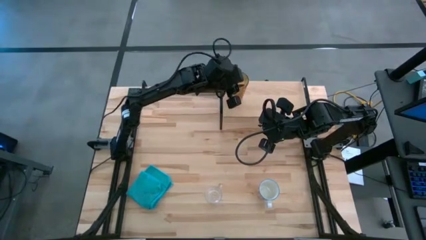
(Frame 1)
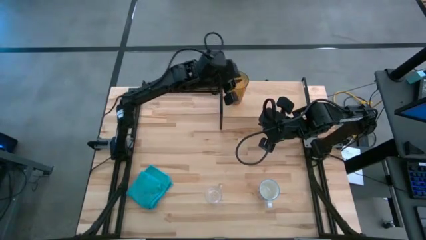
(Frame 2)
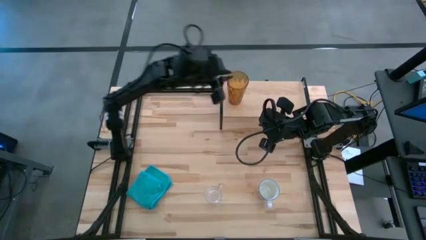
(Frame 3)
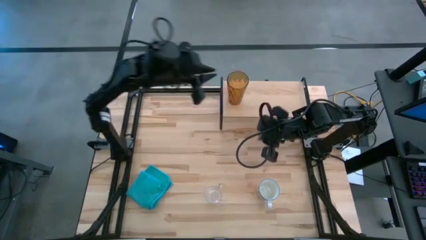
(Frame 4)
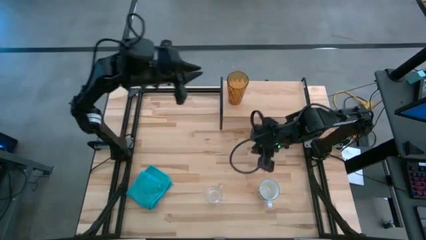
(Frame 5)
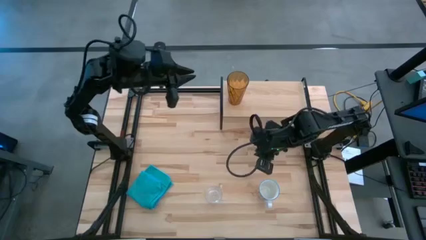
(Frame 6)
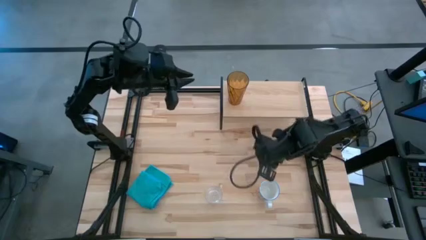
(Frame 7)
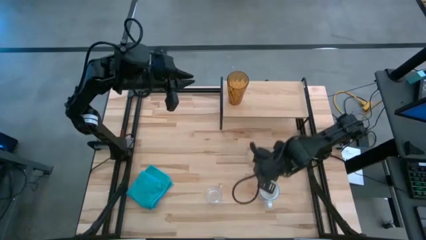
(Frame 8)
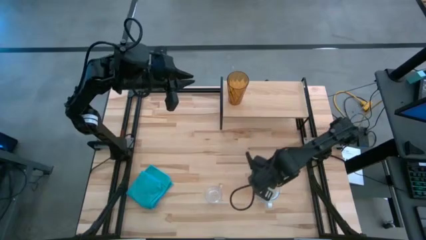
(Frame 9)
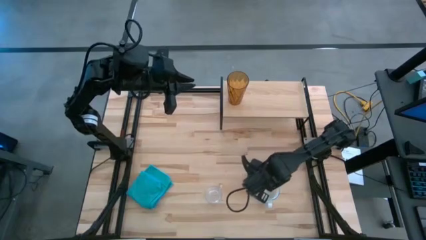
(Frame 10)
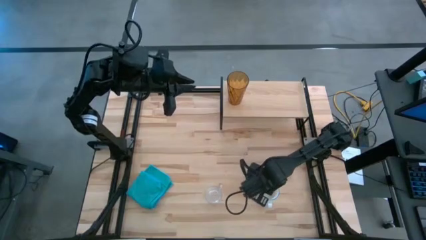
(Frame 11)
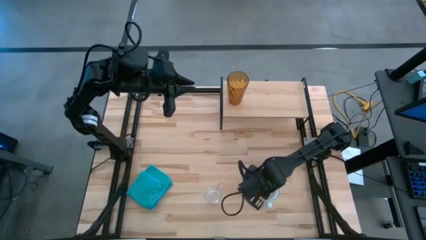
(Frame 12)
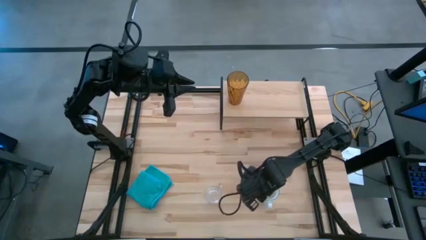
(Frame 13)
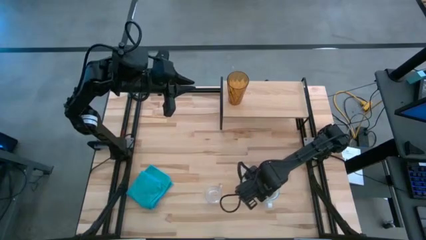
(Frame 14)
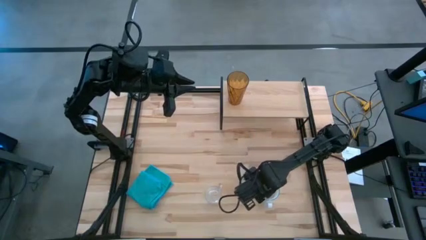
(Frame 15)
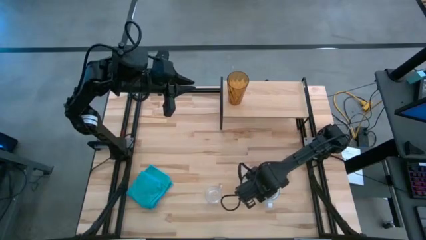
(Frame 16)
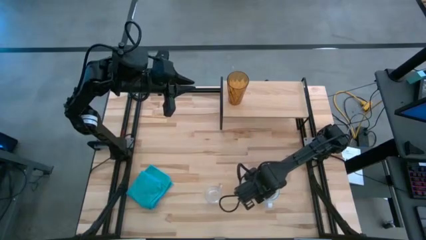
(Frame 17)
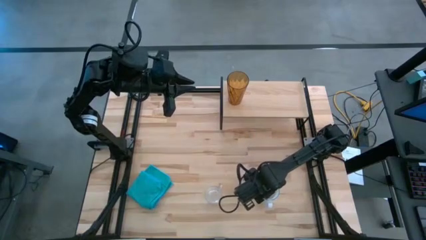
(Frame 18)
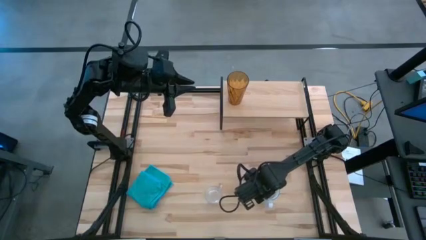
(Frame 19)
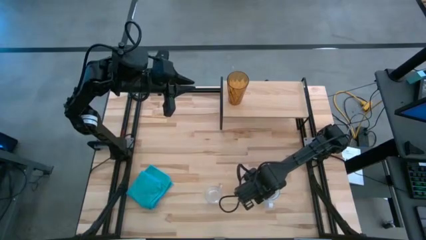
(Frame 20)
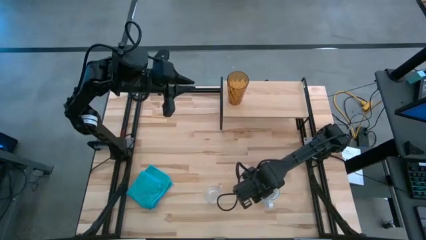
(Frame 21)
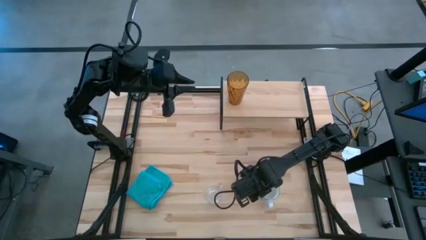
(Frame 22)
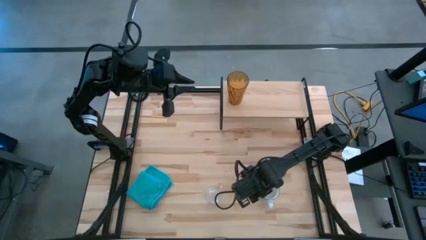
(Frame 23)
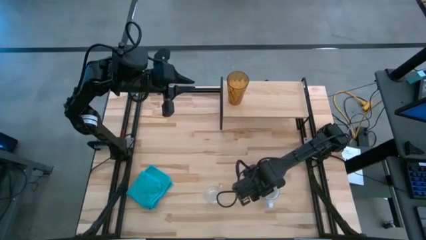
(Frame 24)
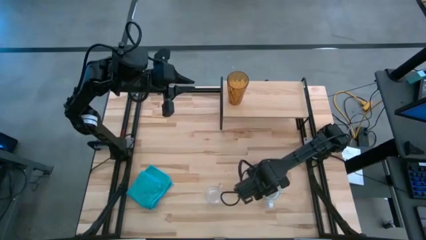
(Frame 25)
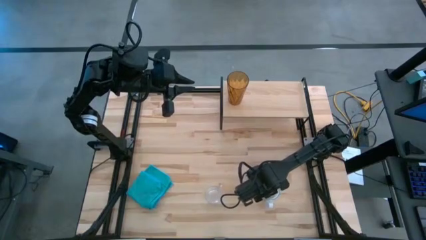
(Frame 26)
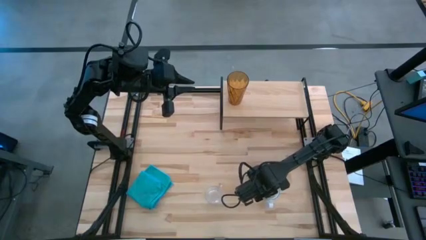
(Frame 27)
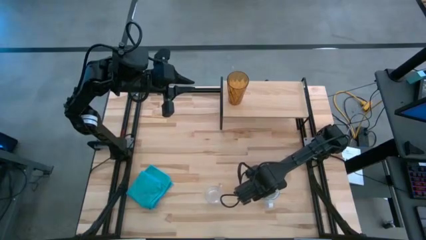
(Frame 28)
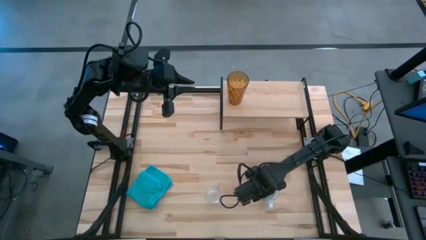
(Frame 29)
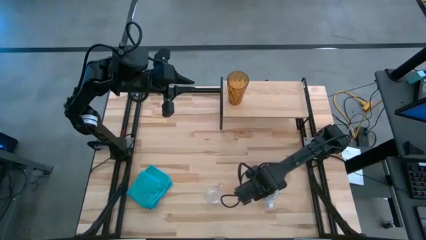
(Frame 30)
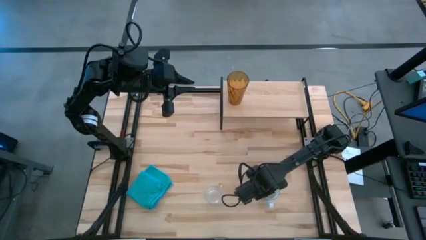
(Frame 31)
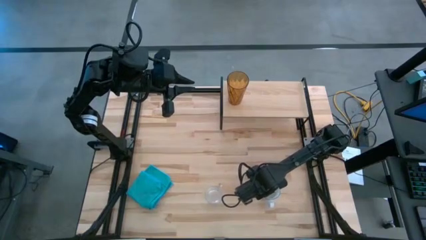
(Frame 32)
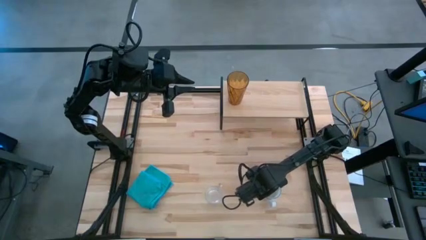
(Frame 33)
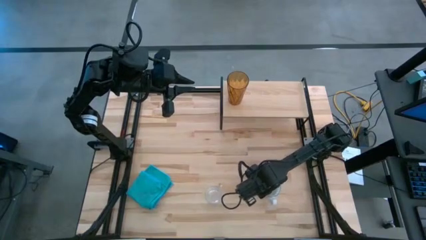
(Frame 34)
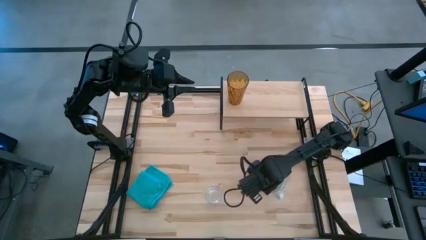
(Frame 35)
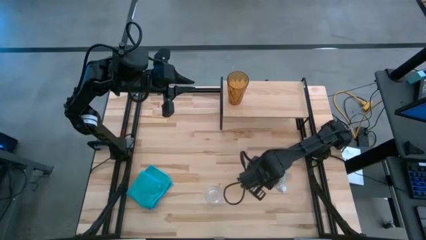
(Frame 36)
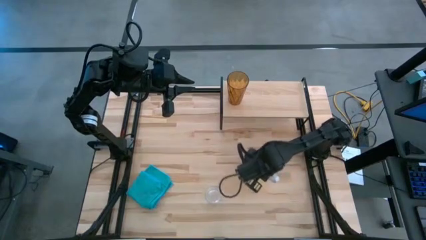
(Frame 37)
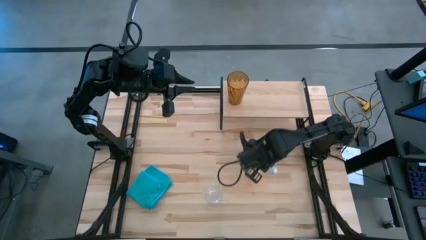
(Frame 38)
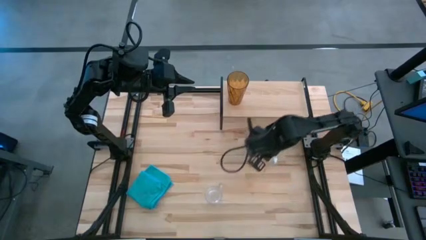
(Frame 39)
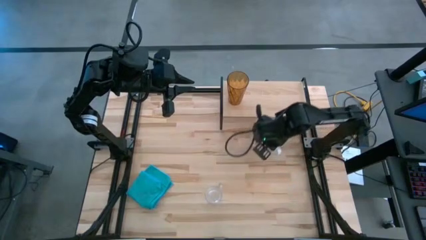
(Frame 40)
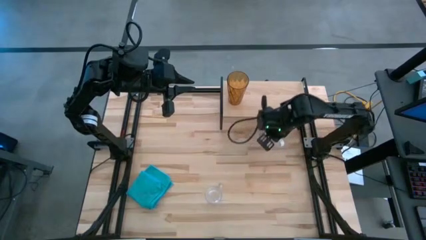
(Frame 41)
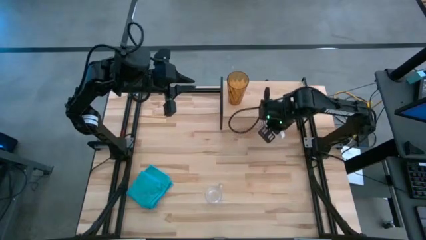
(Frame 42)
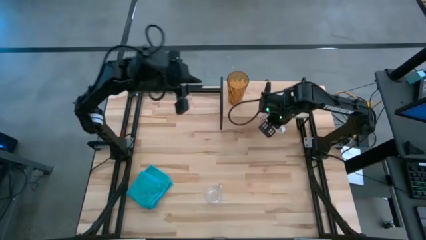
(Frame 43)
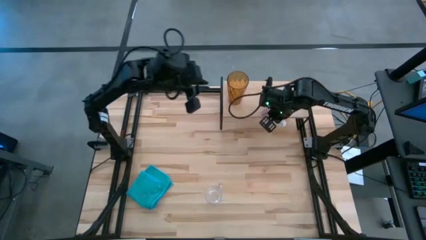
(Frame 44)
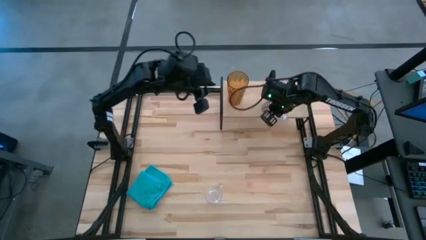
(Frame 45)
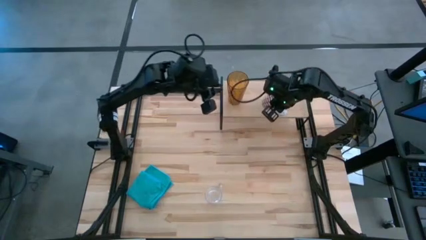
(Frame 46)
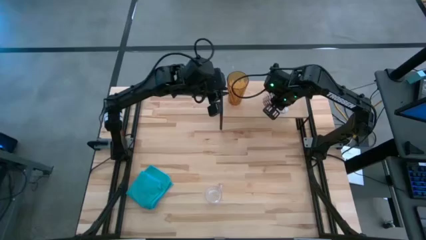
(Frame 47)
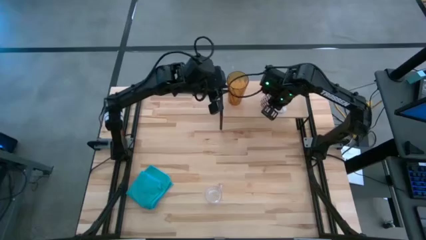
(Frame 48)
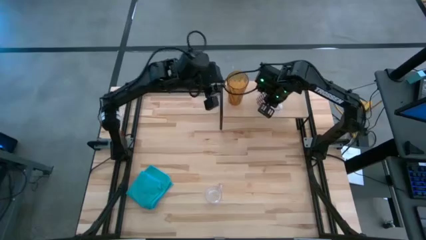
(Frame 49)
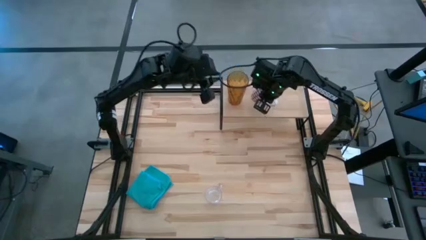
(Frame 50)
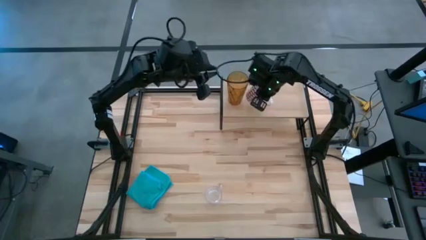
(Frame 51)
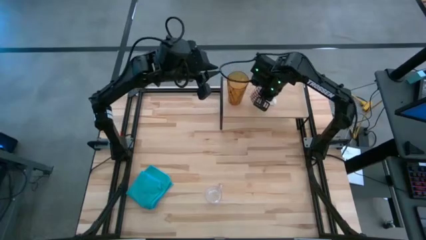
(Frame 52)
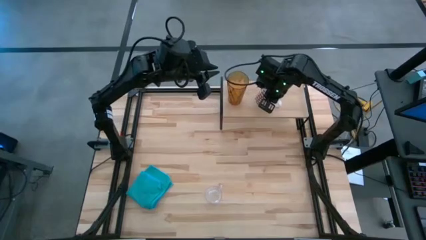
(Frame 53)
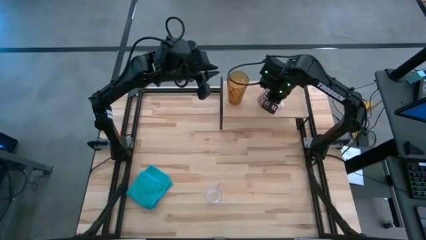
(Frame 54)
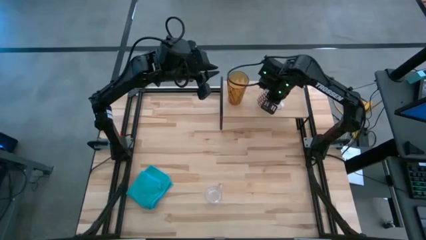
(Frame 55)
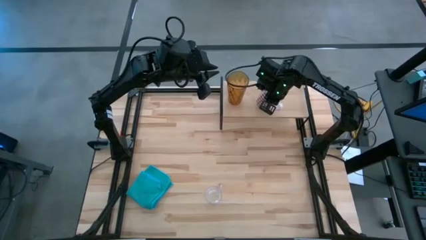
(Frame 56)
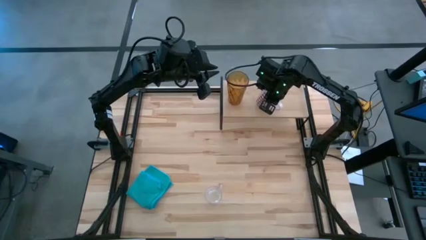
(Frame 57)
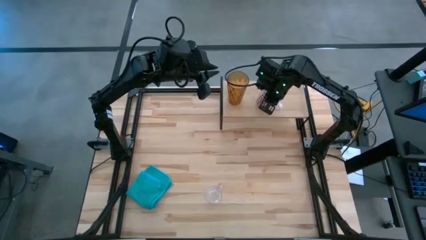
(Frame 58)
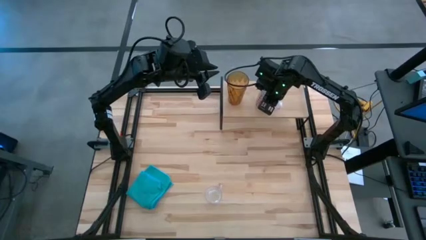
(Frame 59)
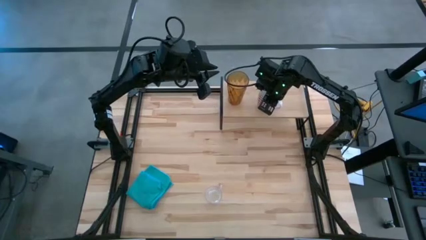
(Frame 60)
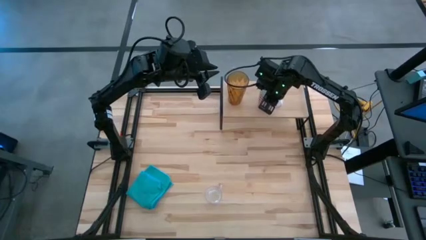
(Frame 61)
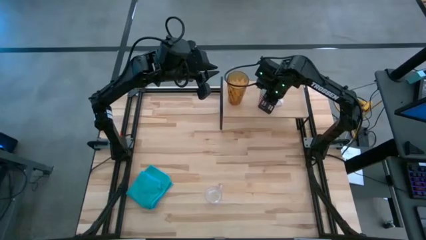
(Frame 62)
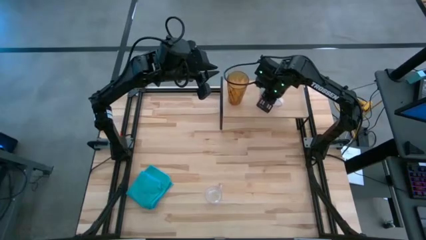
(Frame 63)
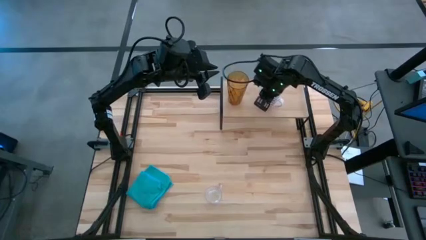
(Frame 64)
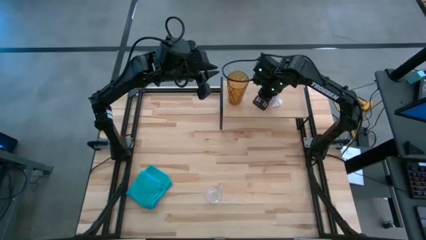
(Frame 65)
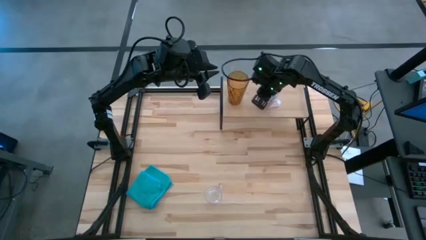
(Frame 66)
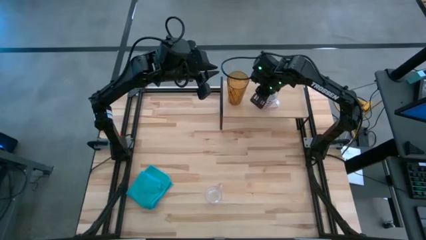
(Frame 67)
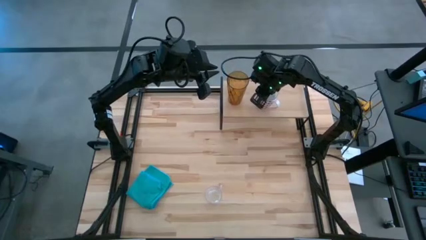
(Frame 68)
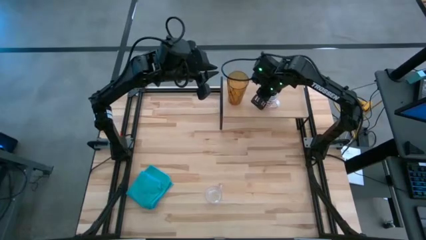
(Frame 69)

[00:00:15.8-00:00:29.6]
Task: Stack small to large cups/mugs on shelf
Put the red patterned mug on the shelf
